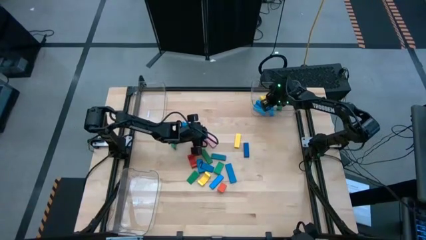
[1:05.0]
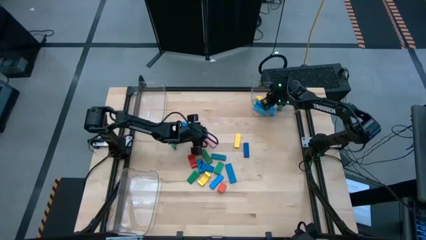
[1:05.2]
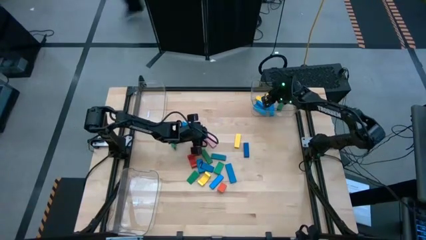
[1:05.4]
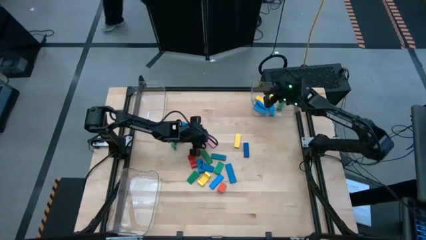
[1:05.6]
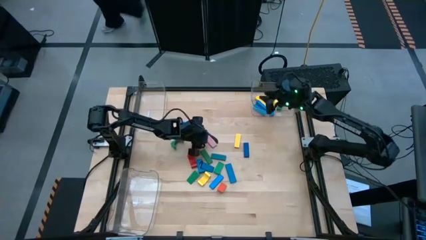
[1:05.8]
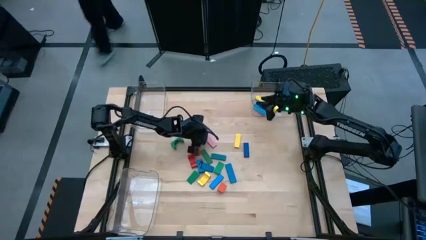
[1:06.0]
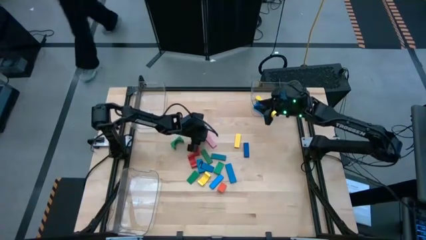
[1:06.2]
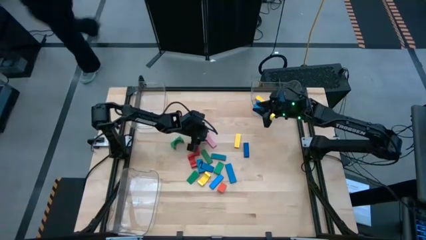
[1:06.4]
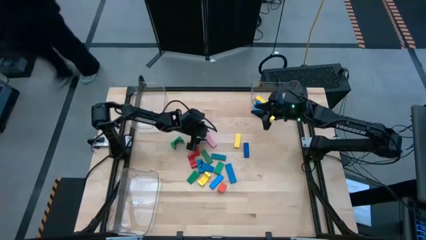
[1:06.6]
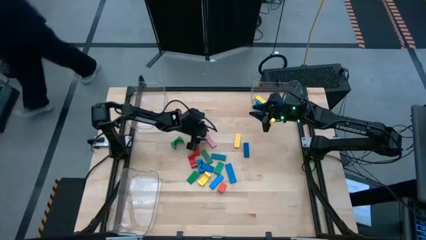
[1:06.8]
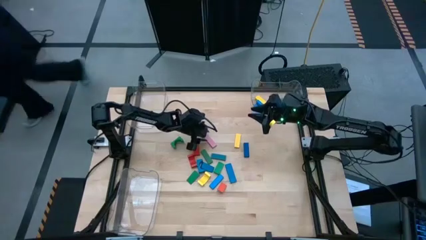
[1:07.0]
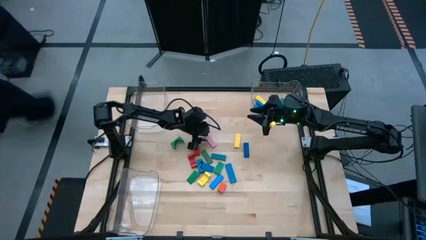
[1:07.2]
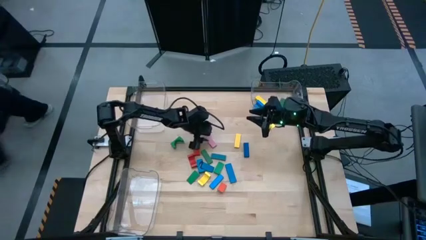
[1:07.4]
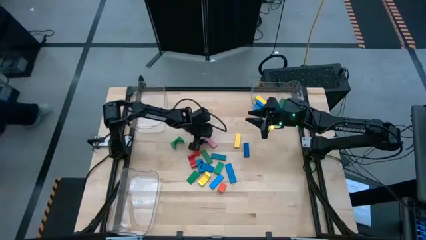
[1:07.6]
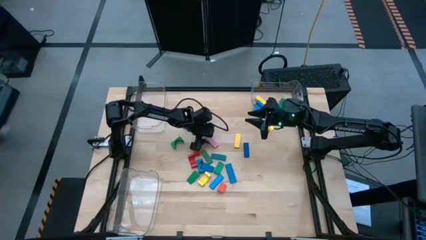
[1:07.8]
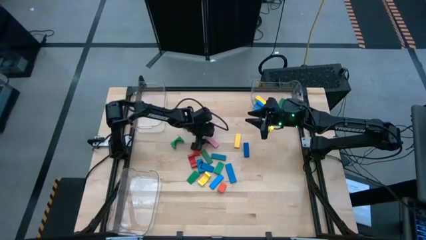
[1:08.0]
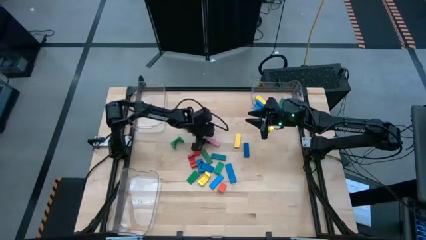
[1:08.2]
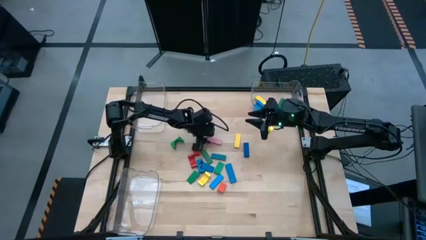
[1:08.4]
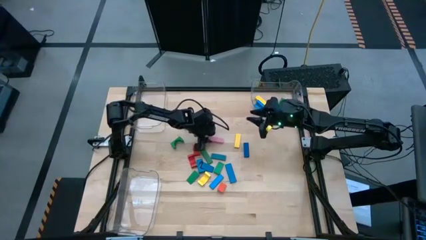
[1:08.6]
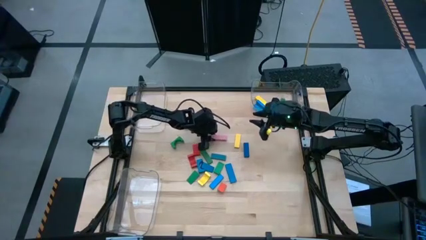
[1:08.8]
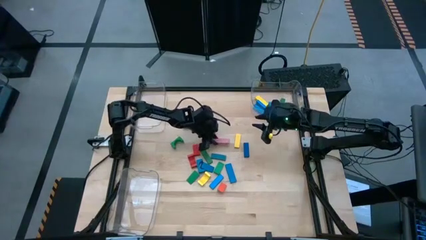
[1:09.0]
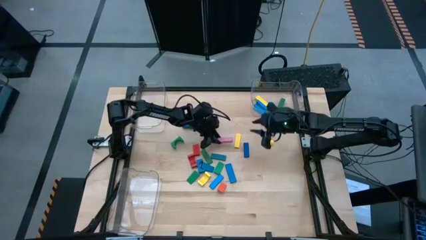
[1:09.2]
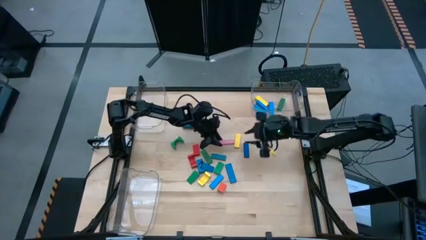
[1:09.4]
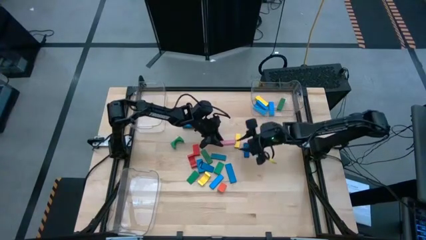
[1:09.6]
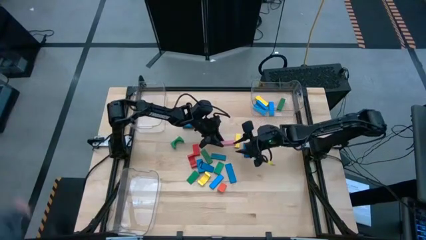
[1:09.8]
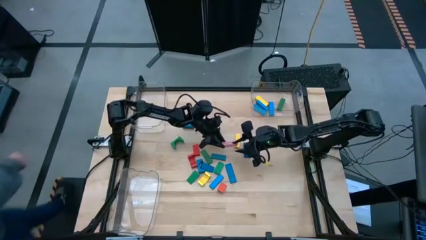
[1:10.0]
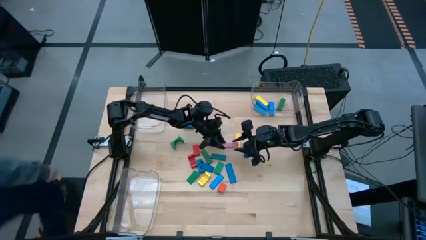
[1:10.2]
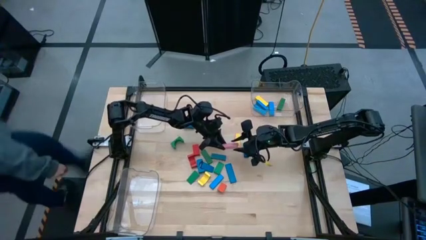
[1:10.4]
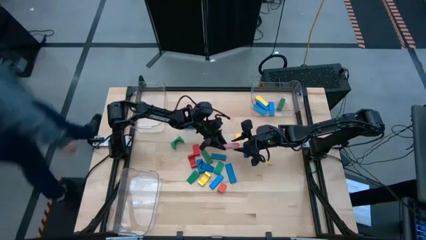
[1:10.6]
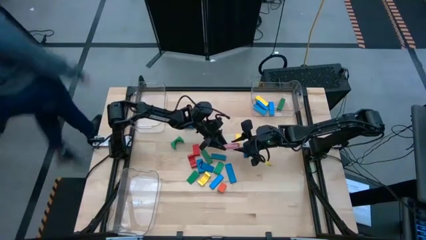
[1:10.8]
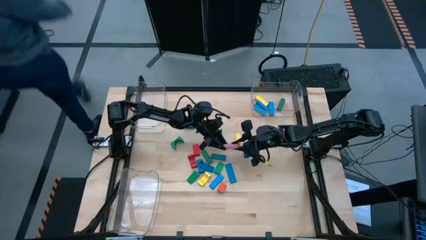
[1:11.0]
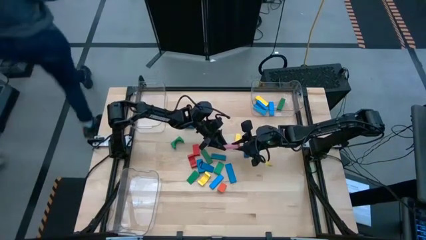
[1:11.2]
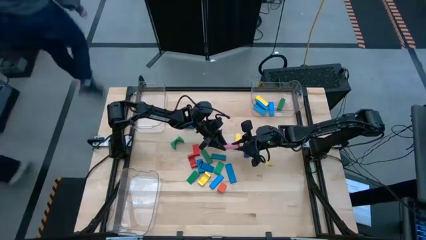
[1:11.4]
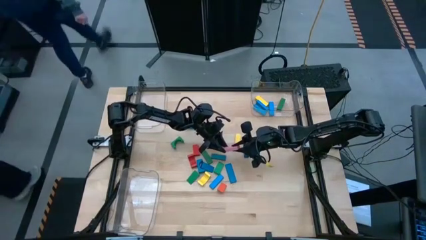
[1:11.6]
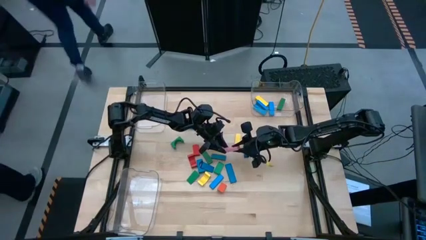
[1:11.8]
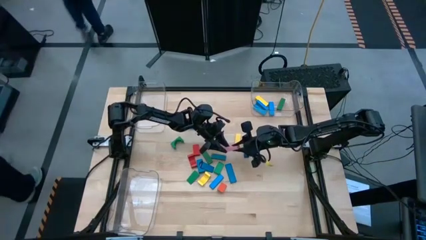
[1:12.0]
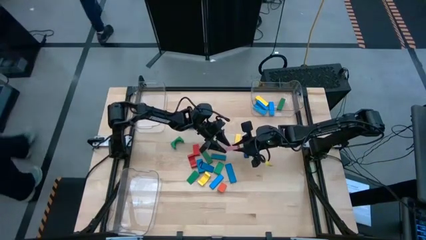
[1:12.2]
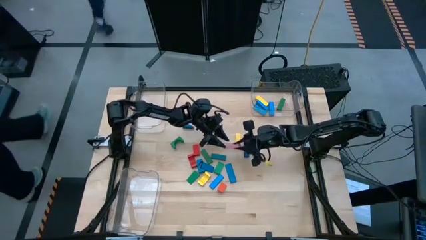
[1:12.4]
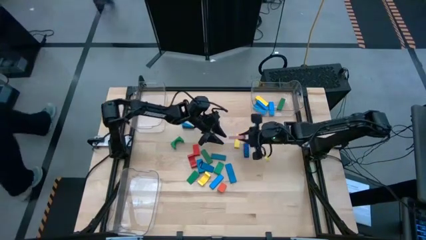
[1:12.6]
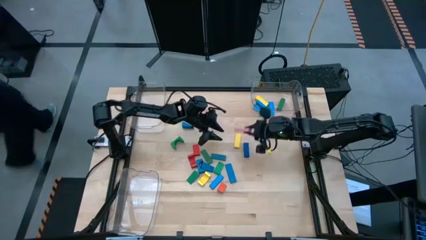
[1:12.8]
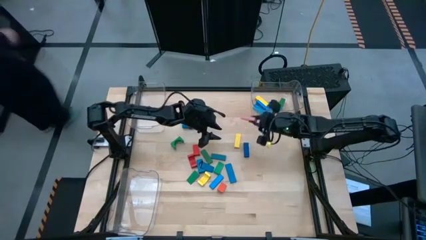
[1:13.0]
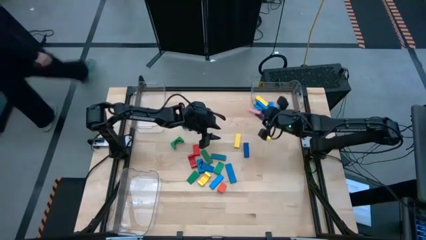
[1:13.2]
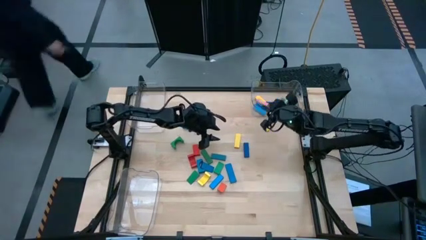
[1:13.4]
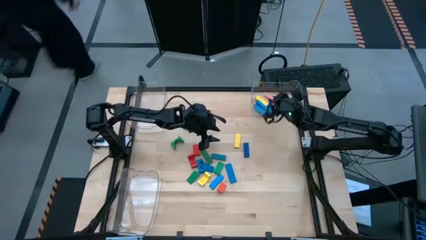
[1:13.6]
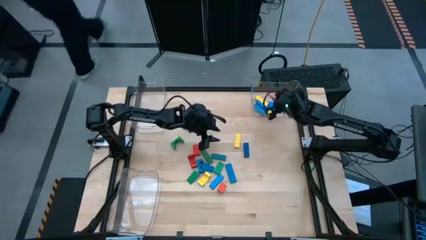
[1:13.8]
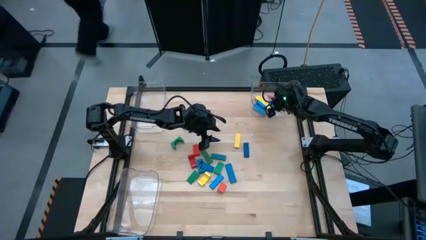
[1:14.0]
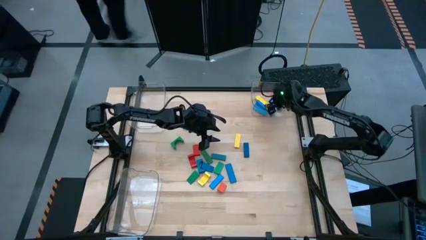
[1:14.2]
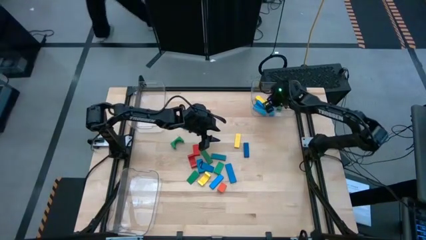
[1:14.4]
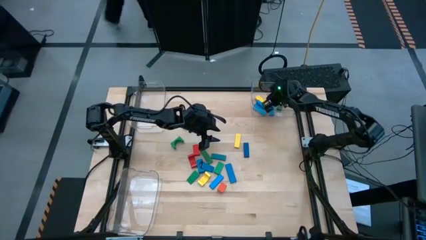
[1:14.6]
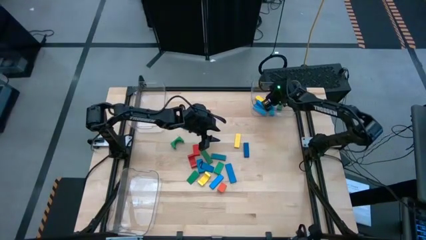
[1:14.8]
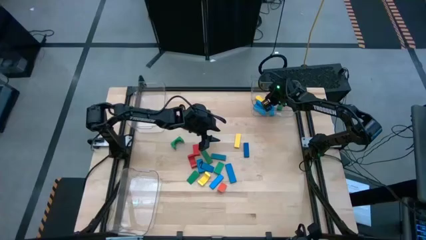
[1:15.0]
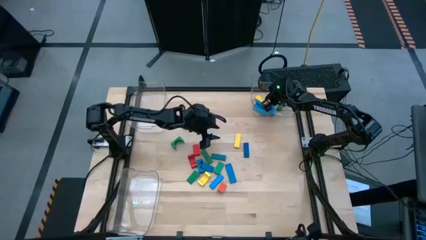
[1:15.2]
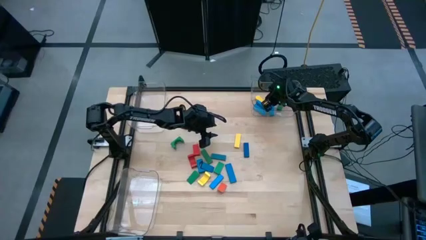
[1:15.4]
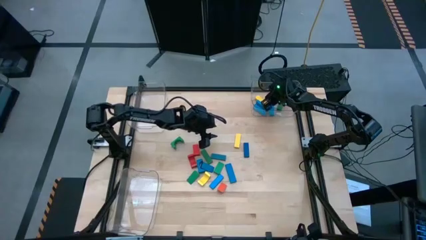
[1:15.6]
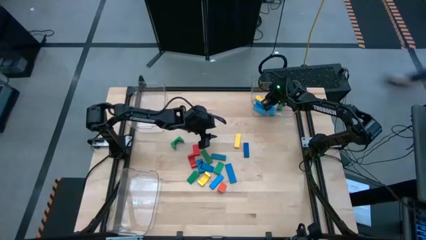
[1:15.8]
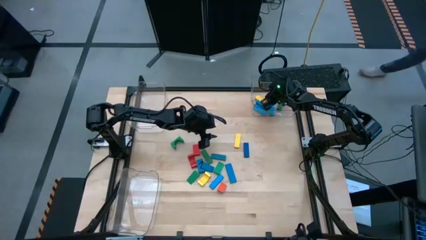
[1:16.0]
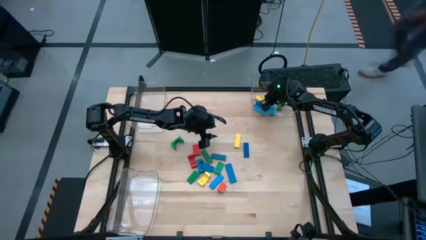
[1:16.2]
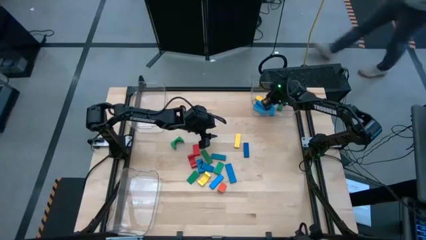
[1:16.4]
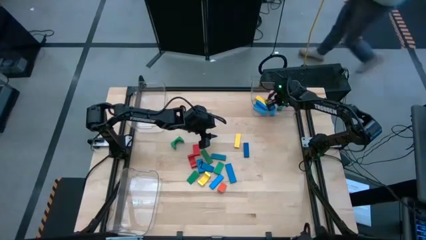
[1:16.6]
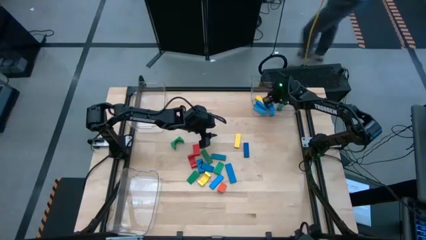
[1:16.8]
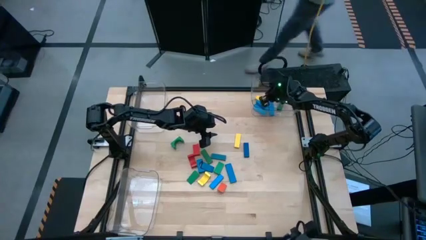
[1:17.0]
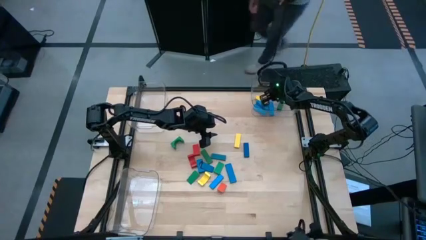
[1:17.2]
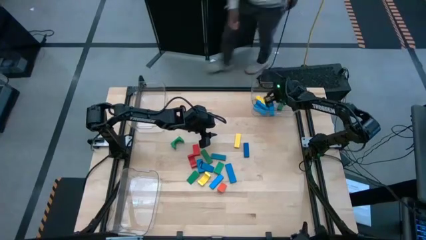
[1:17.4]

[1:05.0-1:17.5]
Task: Sort blocks by size
Put the pink rectangular block into the top right transparent bin

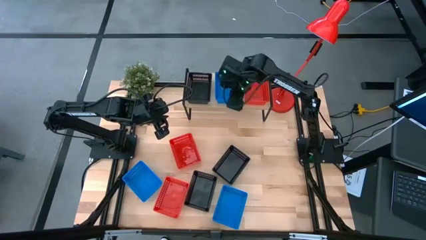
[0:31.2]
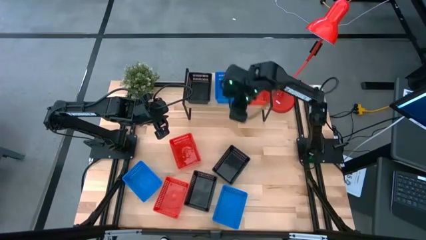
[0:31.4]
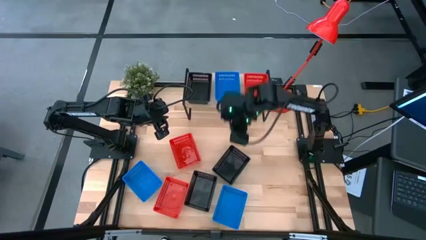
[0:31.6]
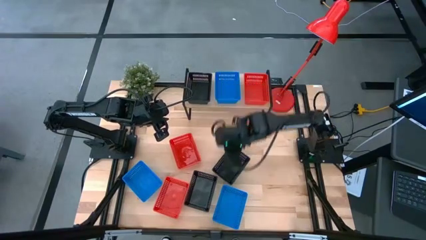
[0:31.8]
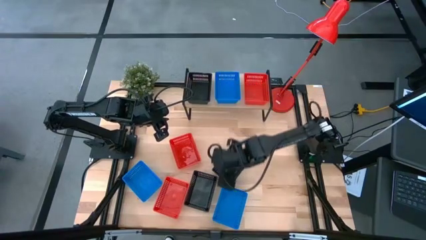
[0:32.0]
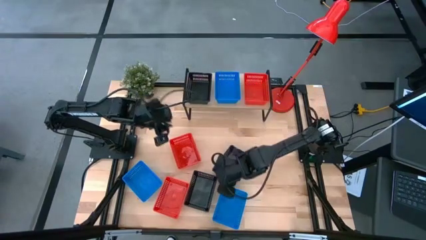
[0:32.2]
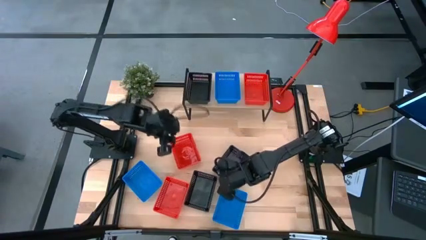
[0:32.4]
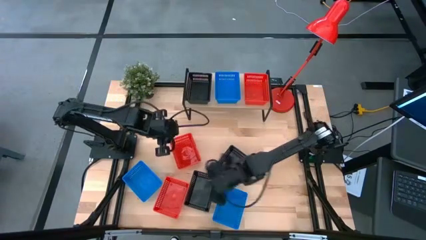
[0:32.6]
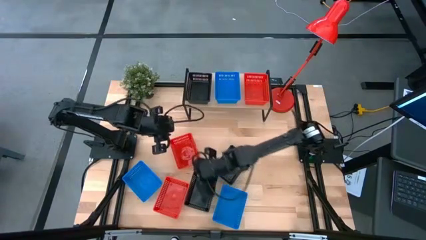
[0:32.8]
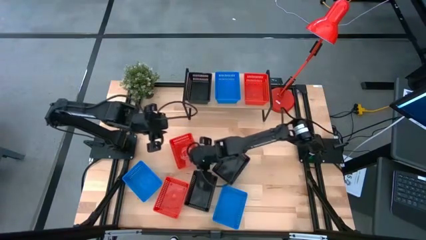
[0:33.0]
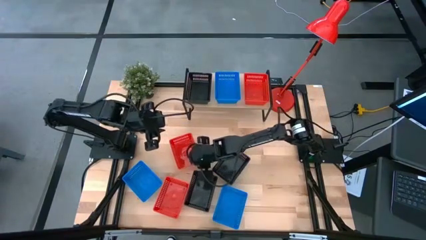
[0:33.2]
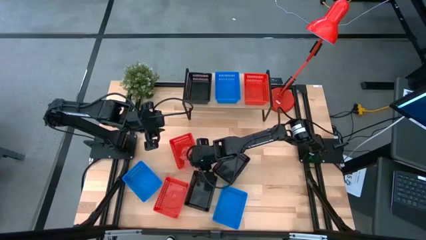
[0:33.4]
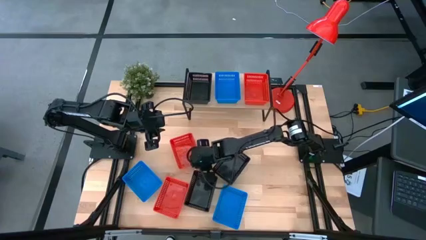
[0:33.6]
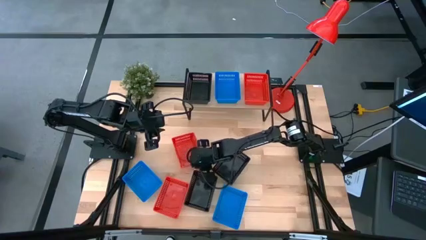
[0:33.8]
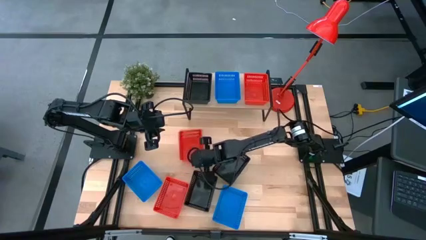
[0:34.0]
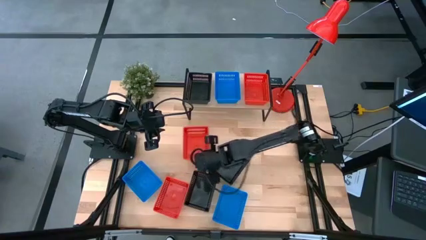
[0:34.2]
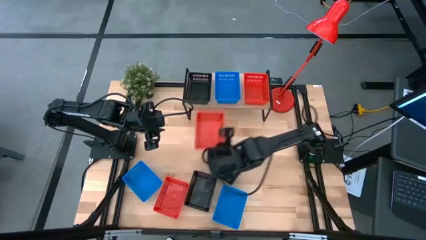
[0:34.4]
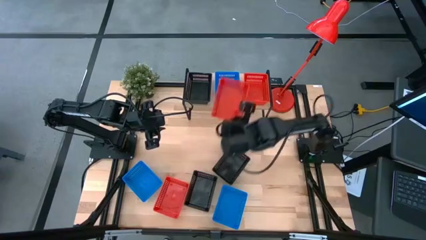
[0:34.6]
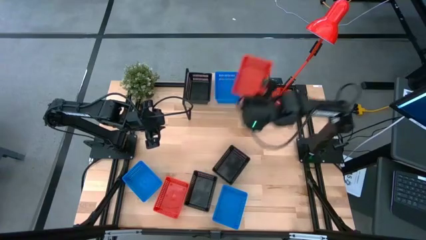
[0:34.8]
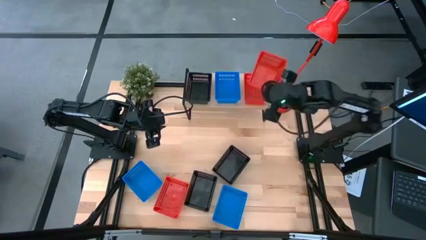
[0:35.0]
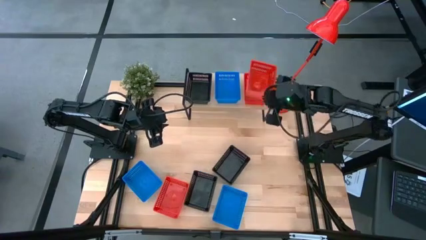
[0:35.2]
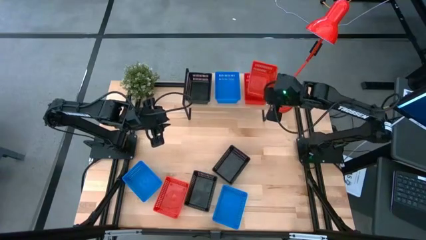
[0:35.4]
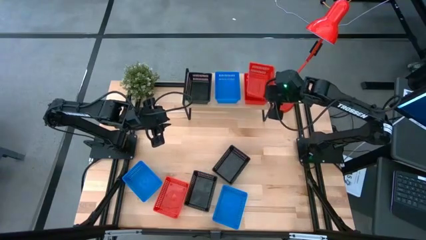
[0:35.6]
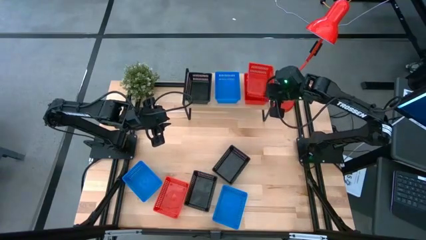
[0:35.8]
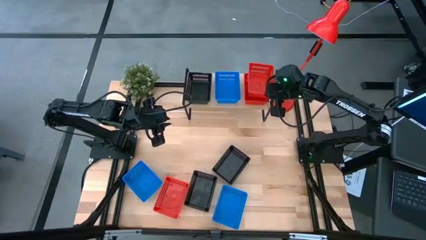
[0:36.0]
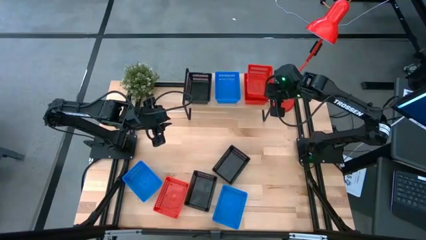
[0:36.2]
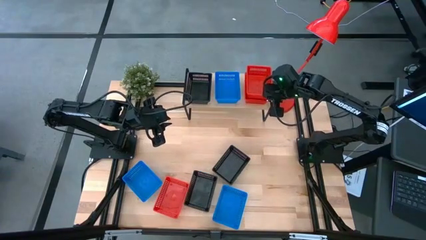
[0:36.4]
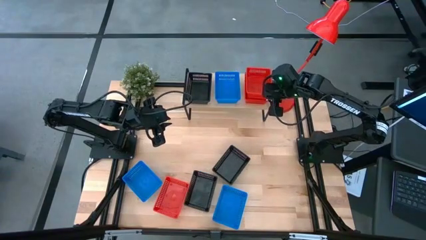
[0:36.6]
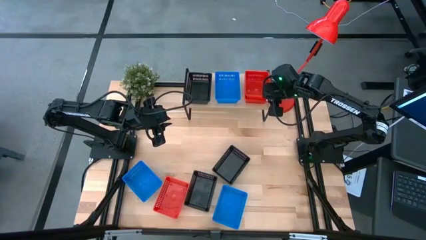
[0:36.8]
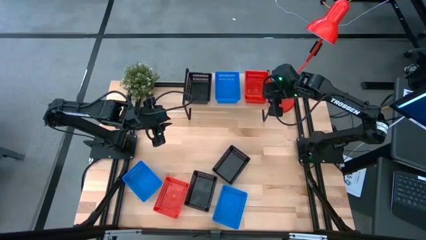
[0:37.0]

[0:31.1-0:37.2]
Task: Stack baskets on shelf by color
Stack the top red basket on top of the red basket on the shelf
